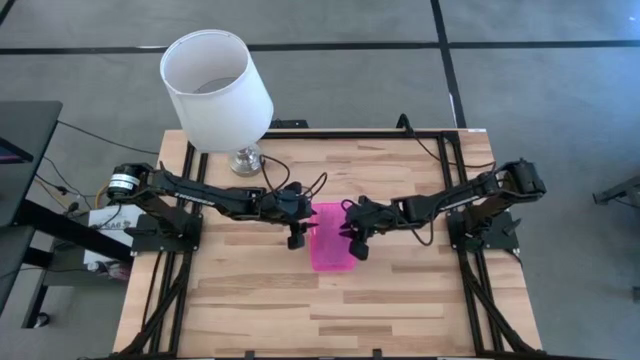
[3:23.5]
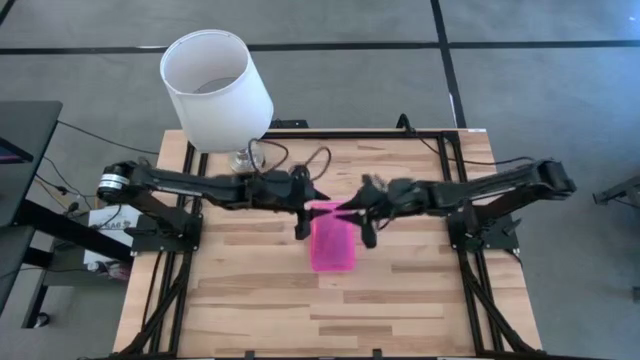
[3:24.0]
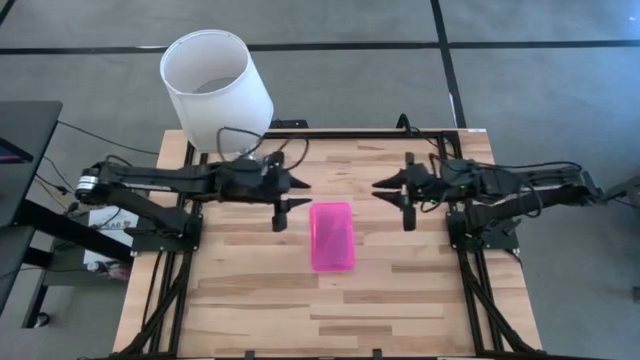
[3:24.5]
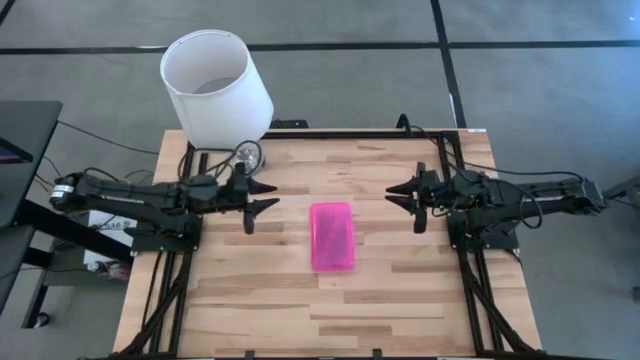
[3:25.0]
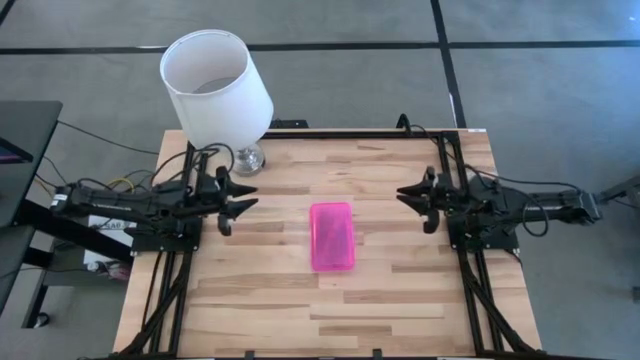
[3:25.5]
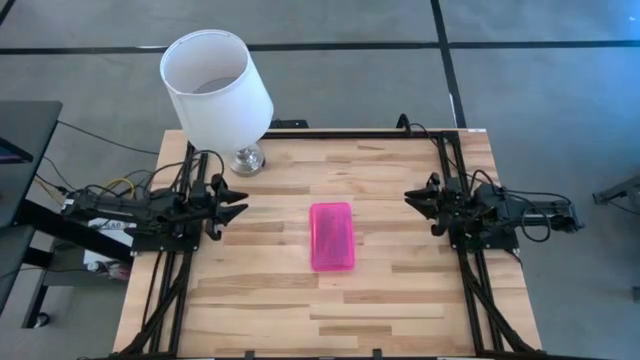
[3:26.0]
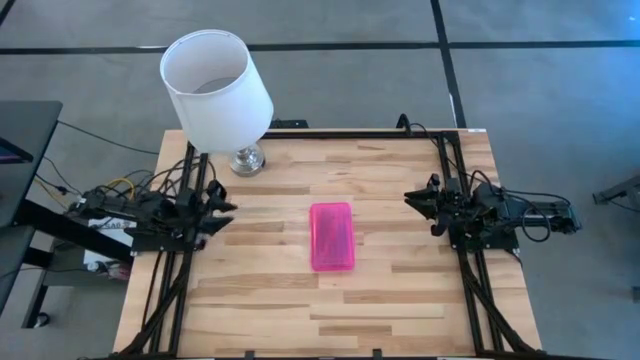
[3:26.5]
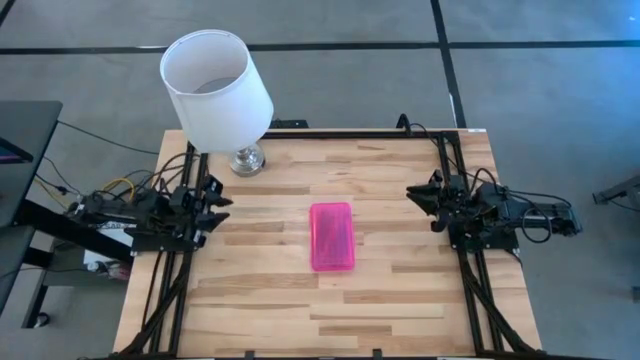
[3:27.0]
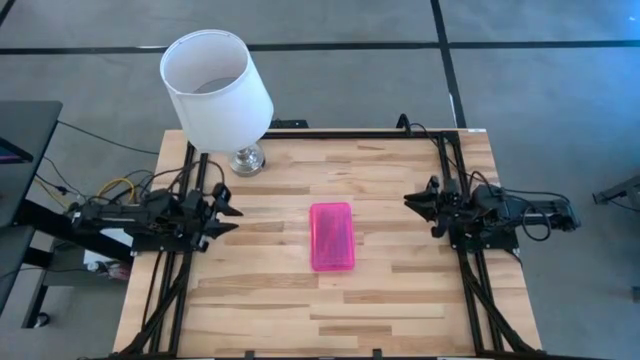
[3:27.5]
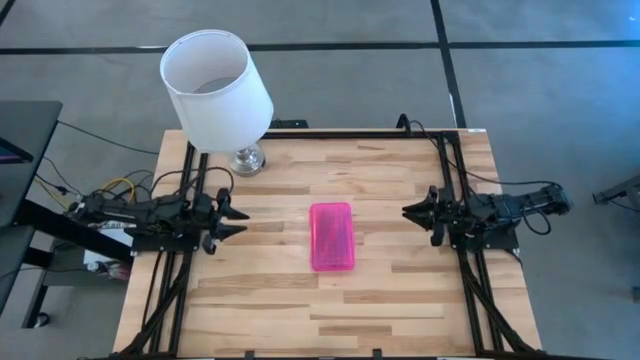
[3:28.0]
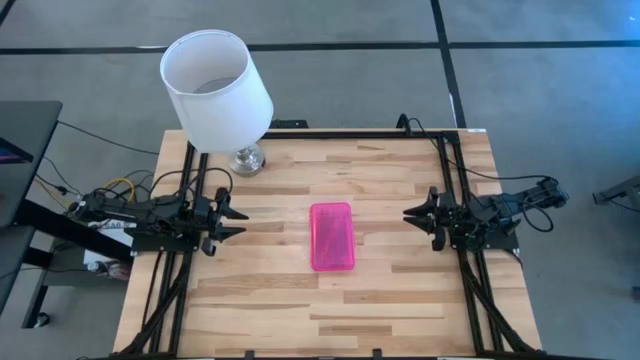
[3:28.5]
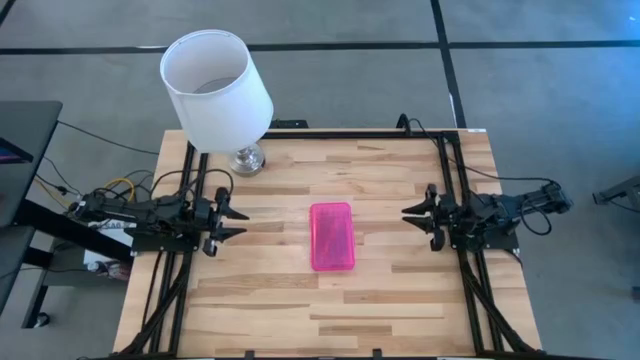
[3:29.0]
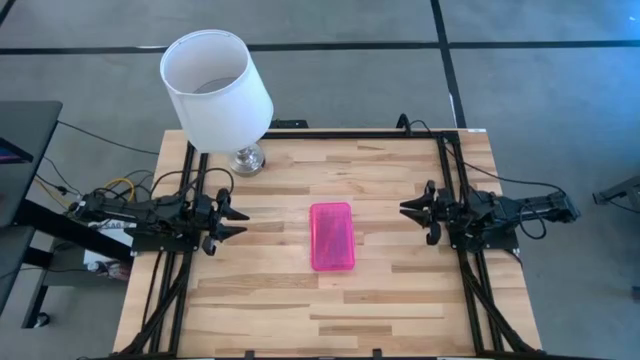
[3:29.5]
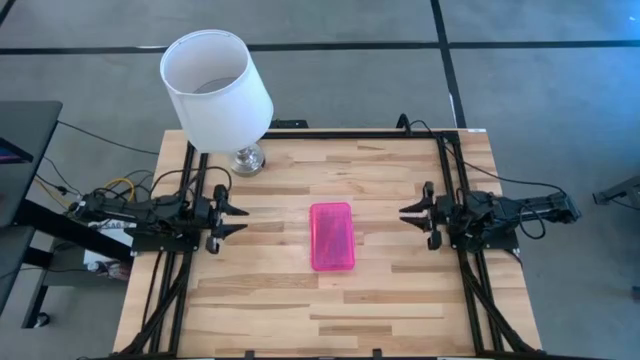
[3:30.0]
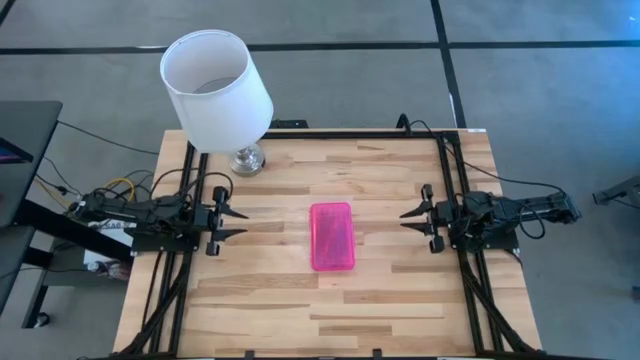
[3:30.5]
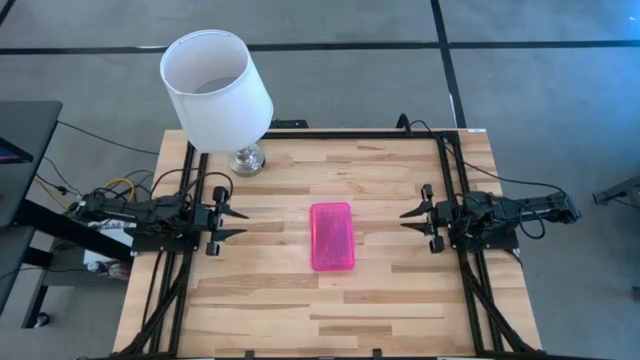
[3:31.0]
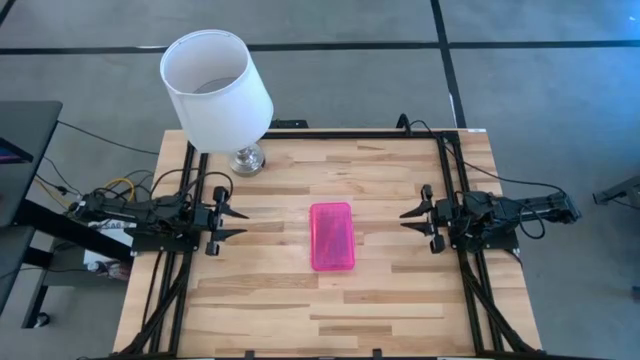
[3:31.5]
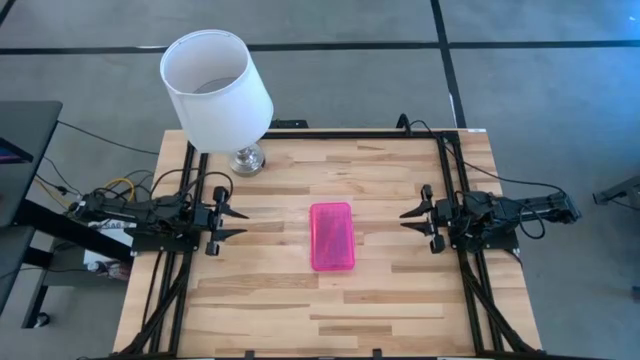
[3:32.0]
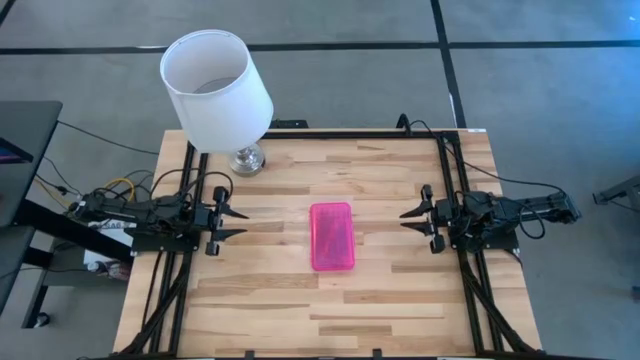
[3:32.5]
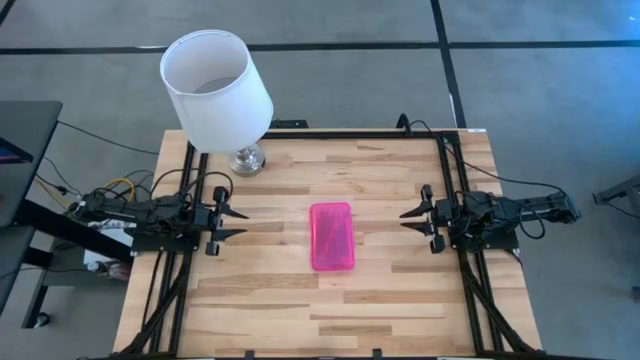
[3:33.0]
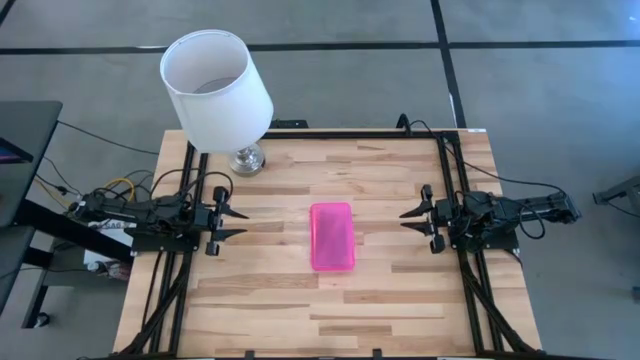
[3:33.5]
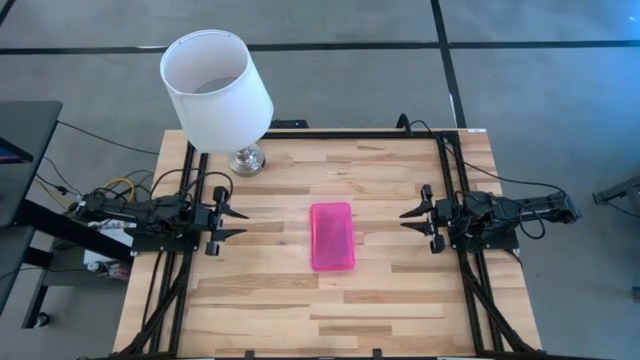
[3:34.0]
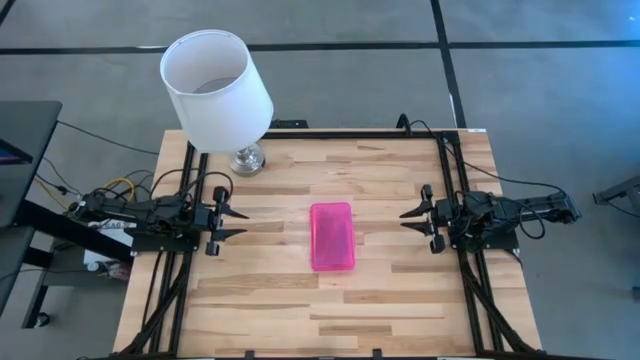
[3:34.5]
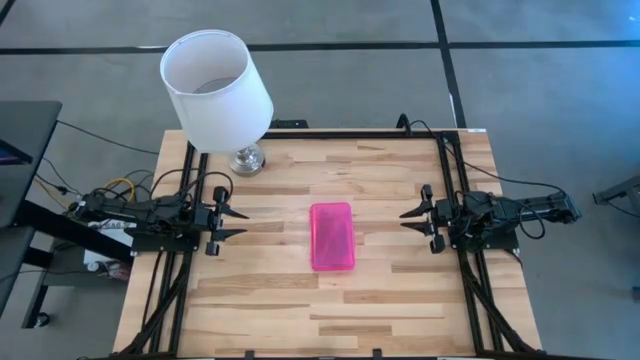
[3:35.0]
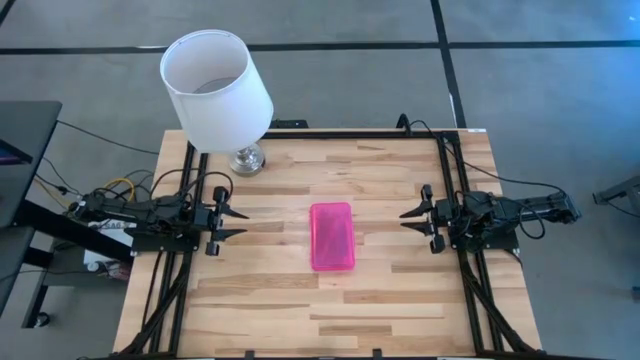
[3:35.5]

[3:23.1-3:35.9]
Task: Pick & place school supplies into a supply box
Return to Home Position

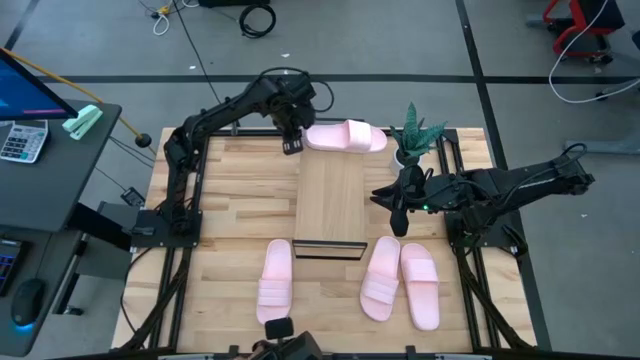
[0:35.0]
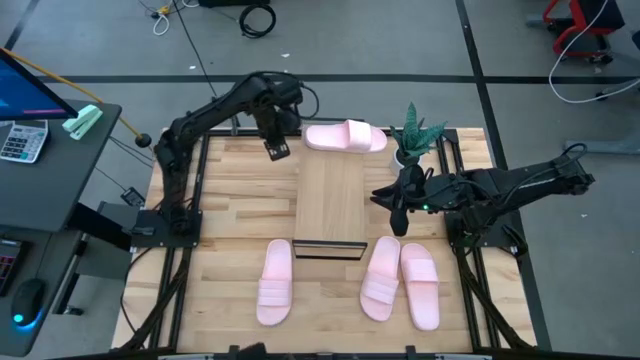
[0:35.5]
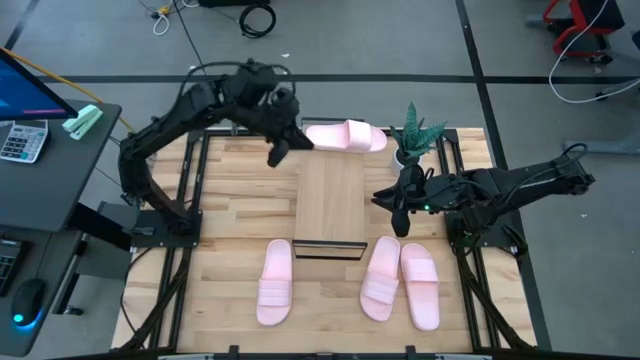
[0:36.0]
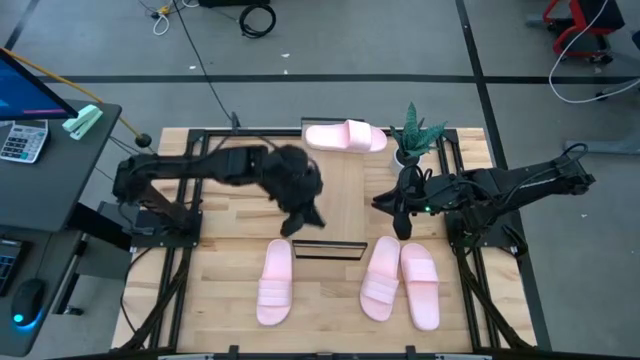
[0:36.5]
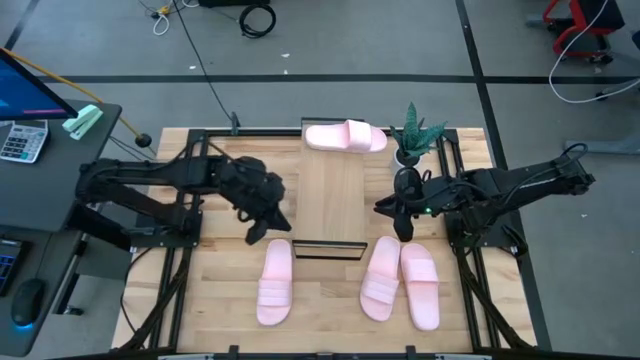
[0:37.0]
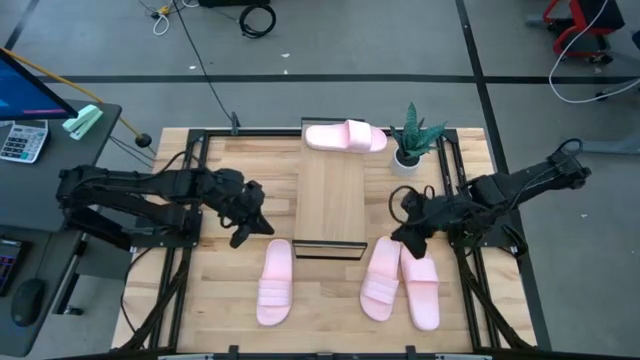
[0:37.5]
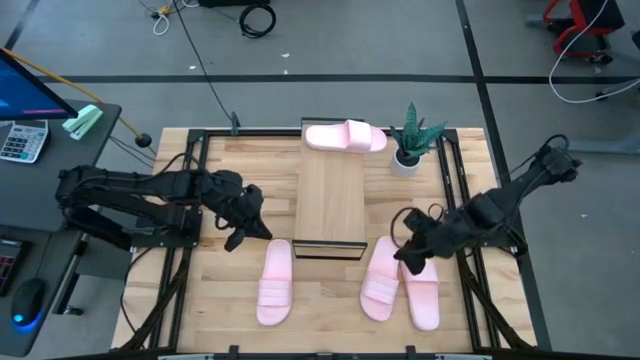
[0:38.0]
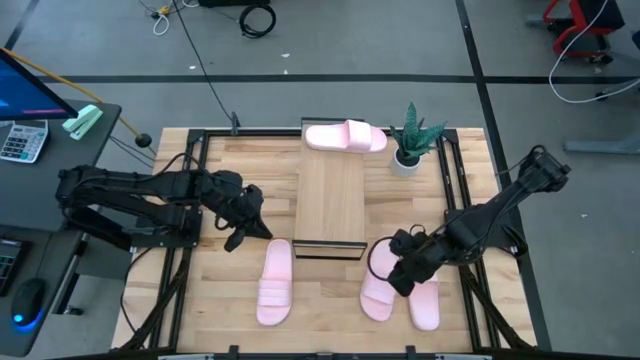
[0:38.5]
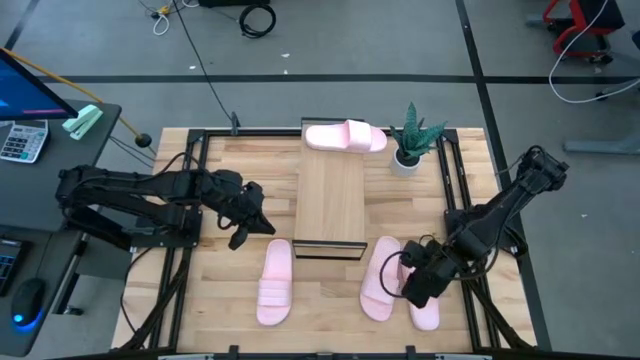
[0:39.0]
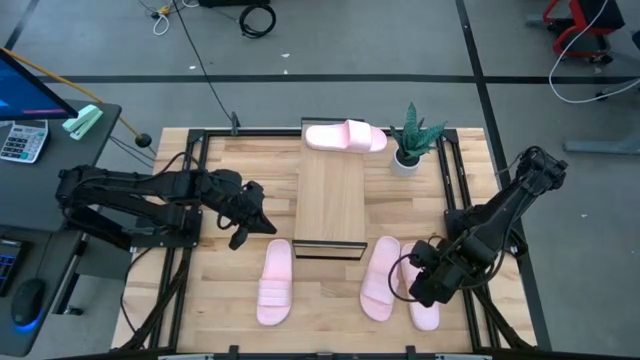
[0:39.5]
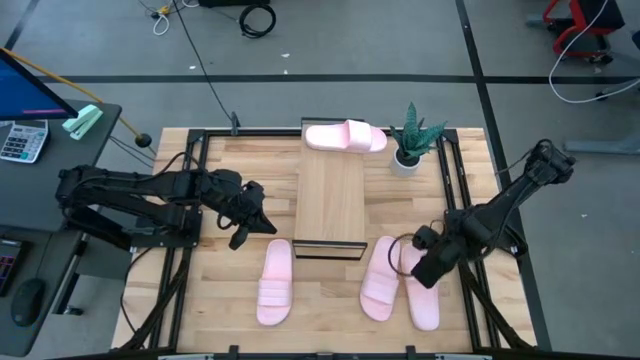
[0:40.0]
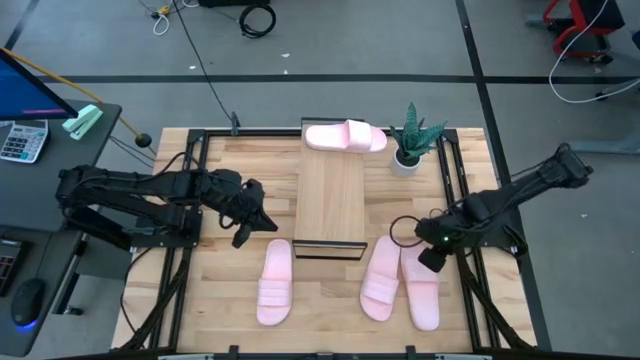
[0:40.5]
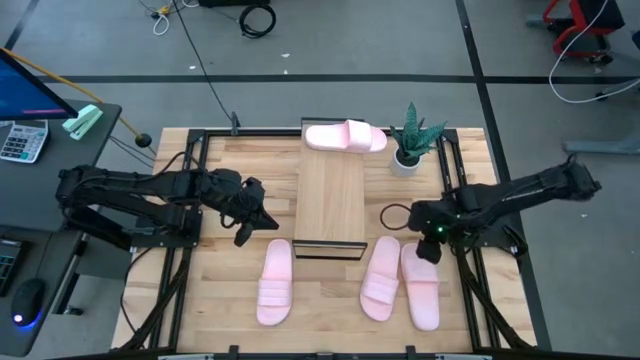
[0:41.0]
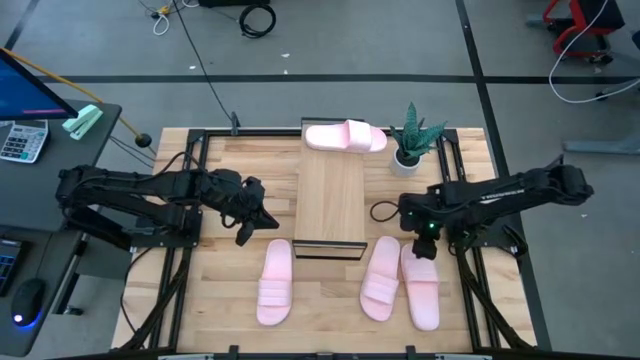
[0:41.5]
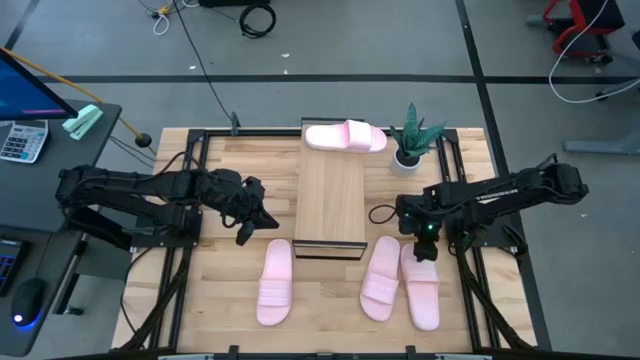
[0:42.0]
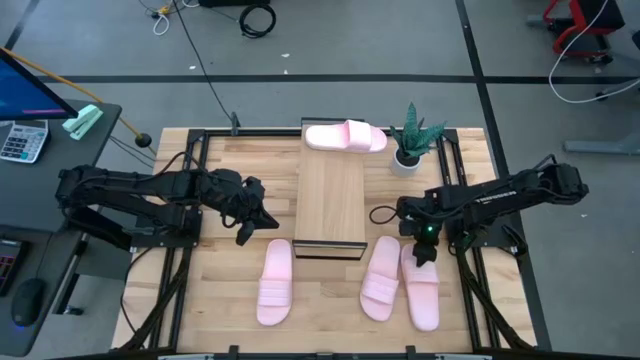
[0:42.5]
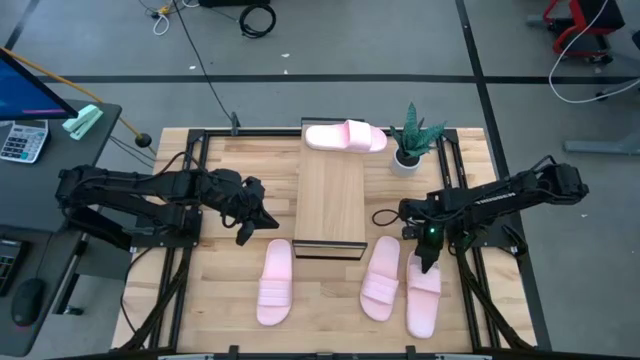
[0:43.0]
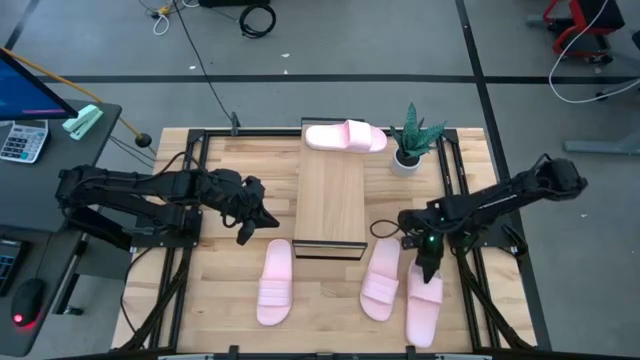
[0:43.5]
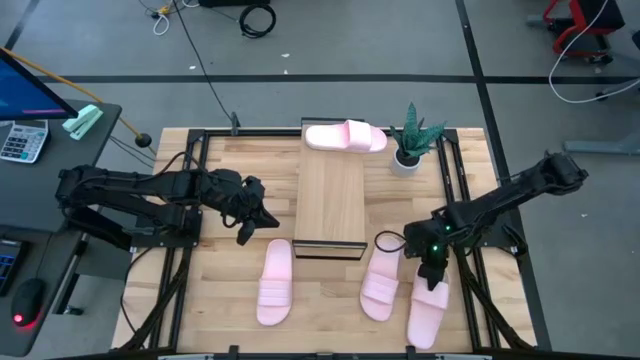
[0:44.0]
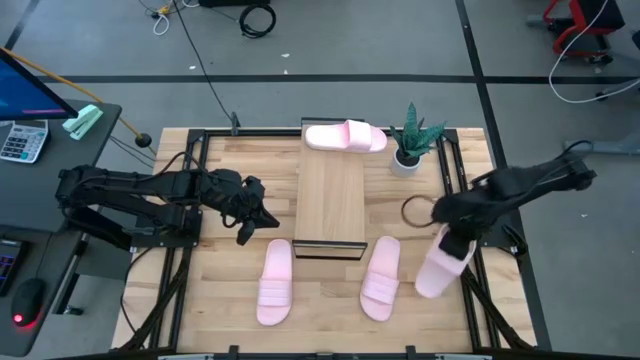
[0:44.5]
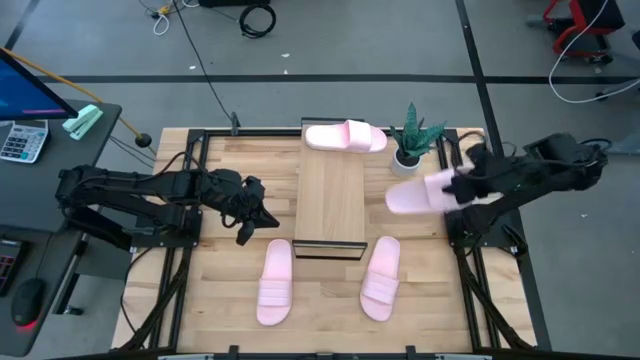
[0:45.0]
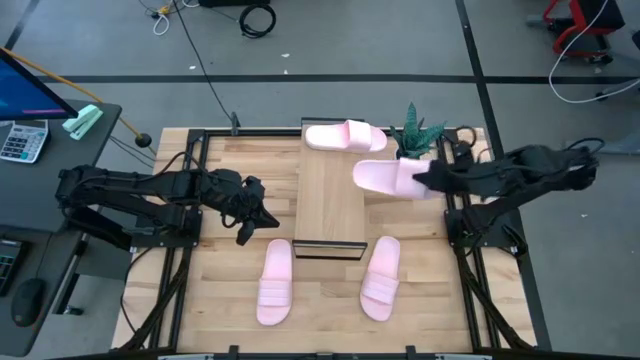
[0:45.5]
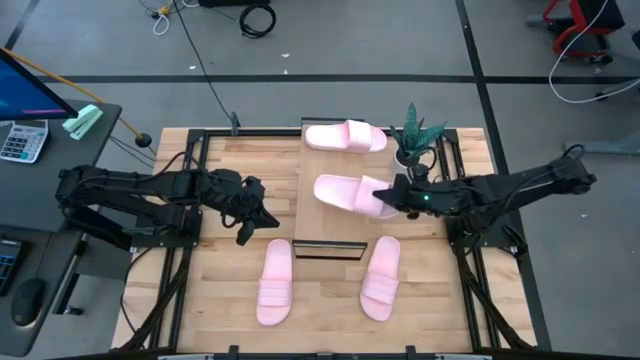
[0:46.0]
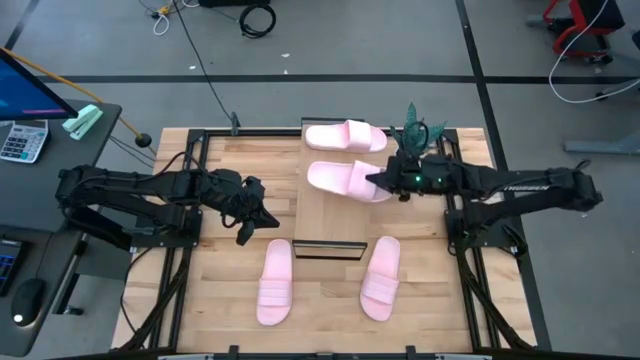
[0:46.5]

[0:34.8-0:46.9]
Task: Pick and place slides into the shelf
Put the pink slide on the shelf
